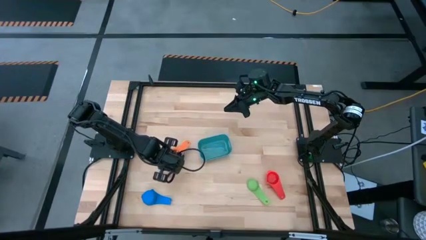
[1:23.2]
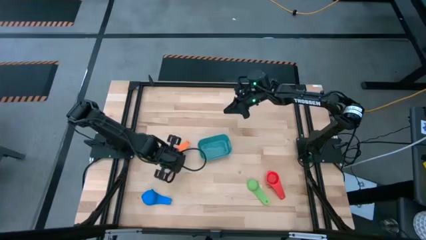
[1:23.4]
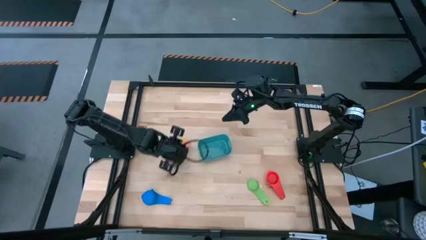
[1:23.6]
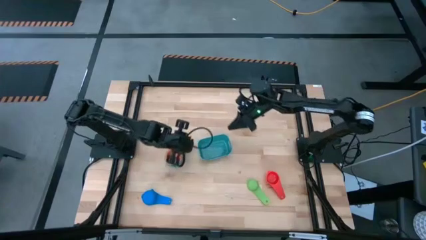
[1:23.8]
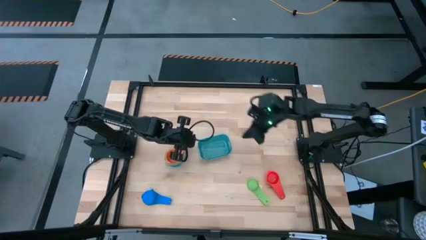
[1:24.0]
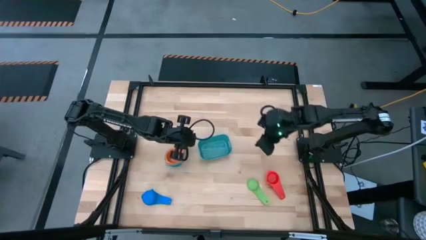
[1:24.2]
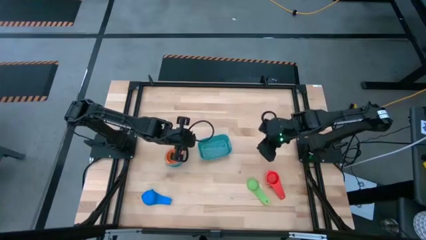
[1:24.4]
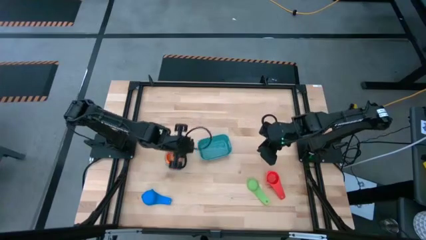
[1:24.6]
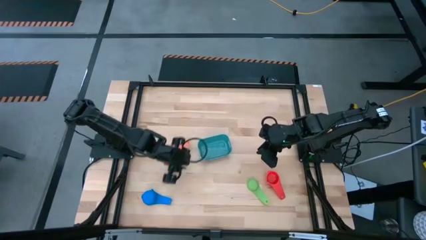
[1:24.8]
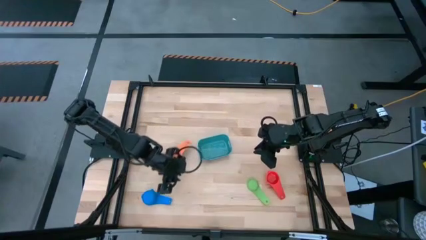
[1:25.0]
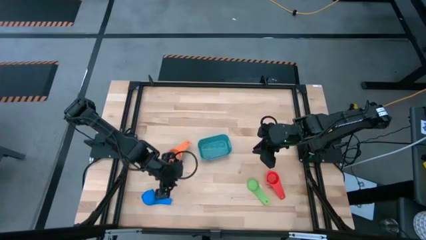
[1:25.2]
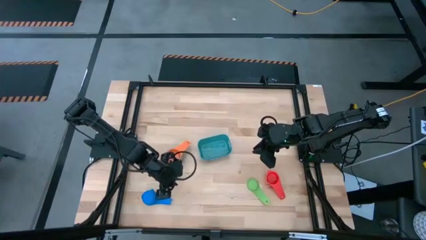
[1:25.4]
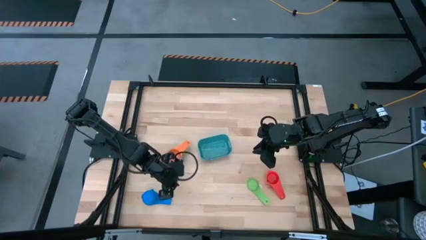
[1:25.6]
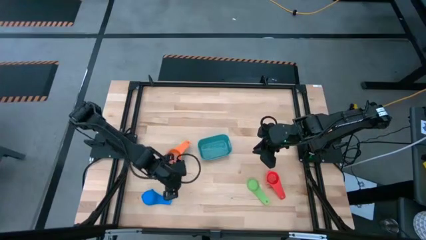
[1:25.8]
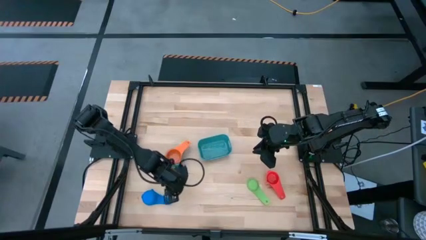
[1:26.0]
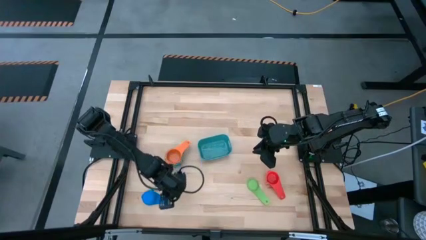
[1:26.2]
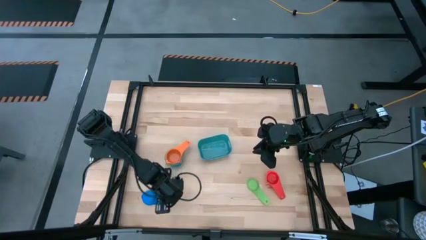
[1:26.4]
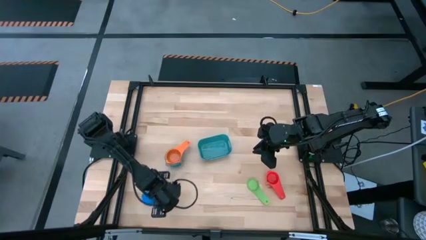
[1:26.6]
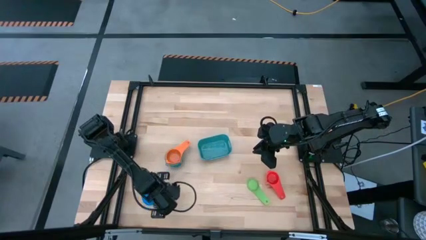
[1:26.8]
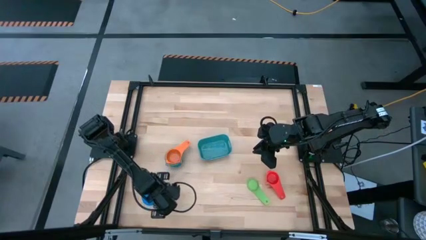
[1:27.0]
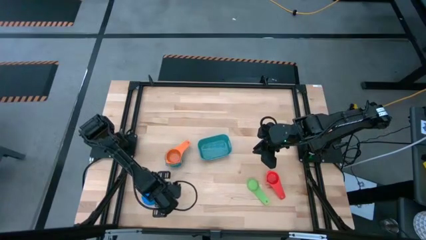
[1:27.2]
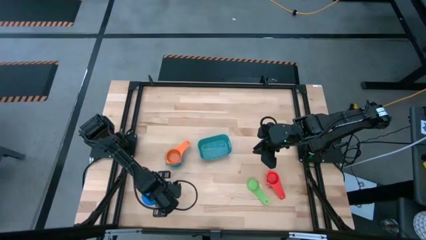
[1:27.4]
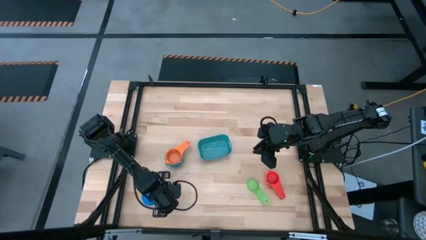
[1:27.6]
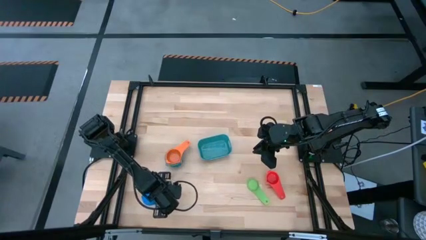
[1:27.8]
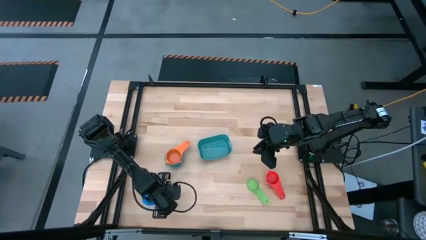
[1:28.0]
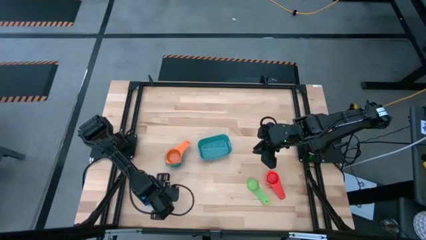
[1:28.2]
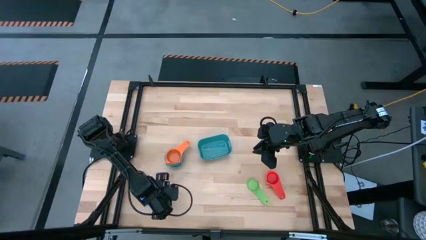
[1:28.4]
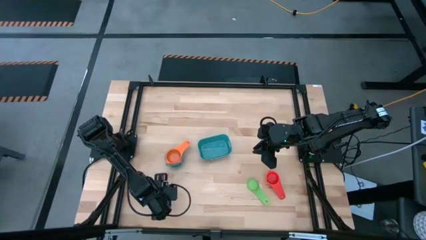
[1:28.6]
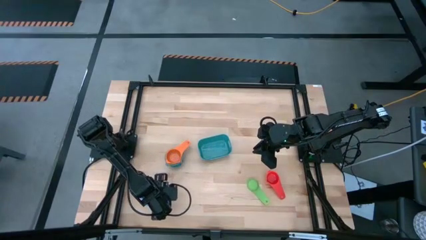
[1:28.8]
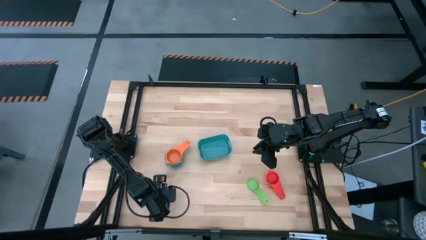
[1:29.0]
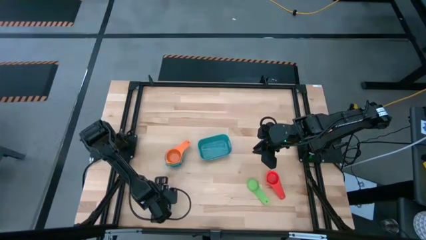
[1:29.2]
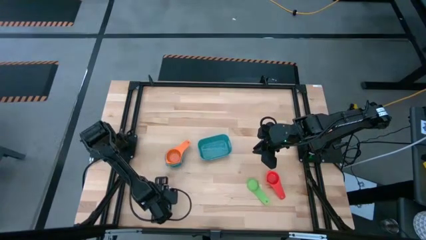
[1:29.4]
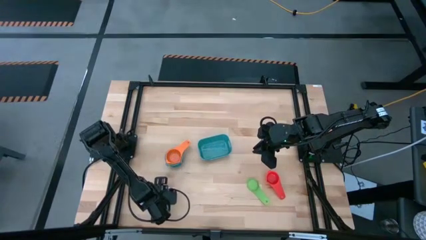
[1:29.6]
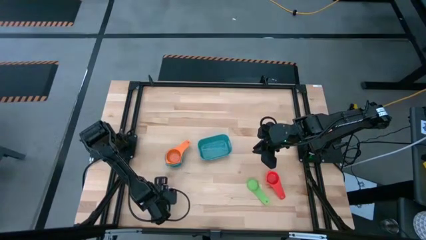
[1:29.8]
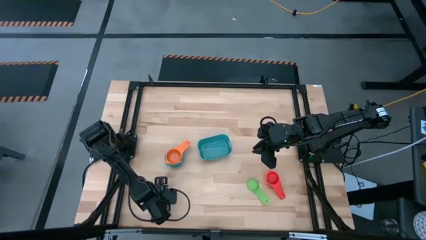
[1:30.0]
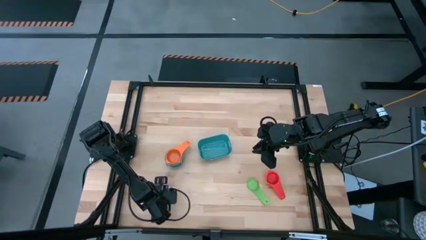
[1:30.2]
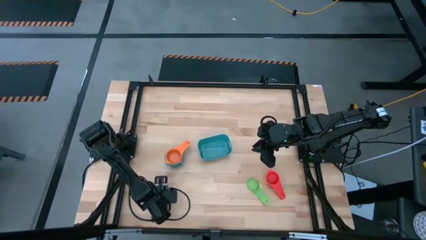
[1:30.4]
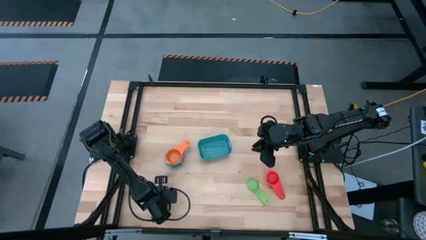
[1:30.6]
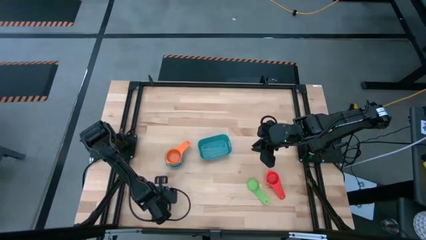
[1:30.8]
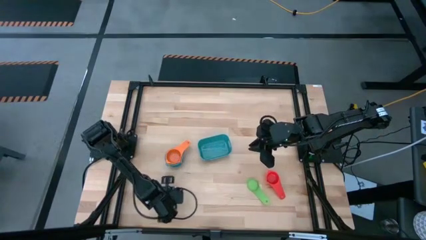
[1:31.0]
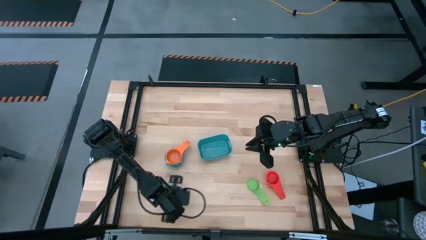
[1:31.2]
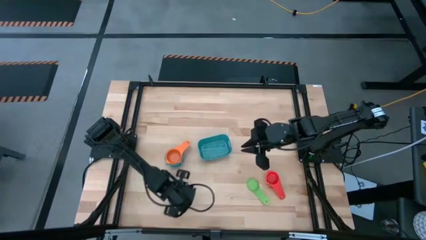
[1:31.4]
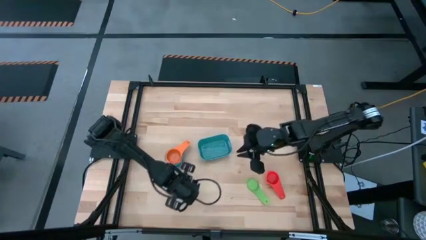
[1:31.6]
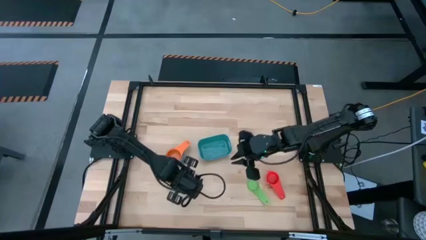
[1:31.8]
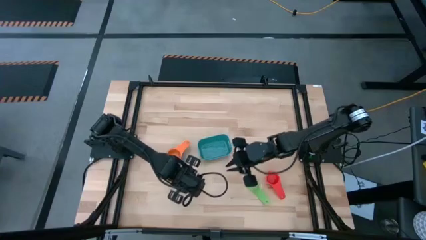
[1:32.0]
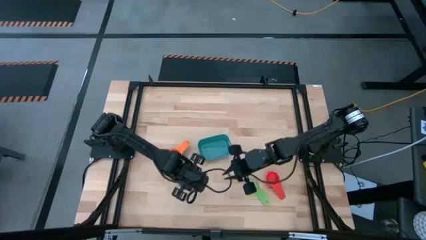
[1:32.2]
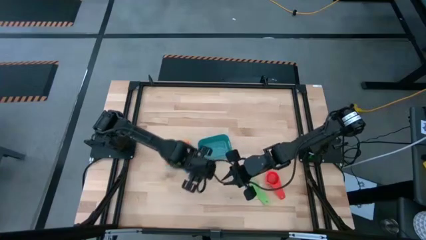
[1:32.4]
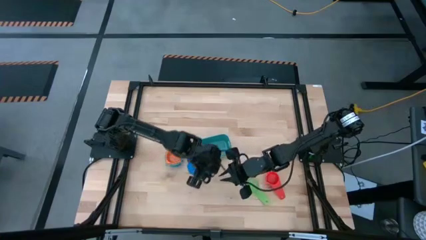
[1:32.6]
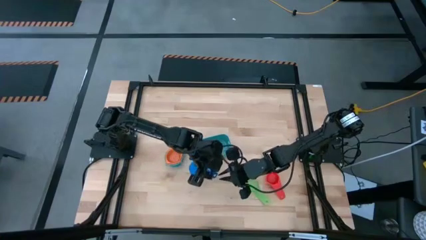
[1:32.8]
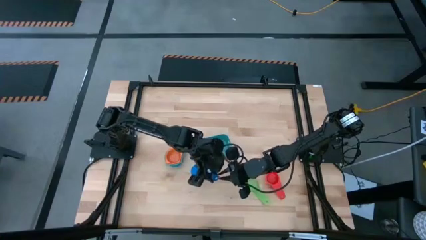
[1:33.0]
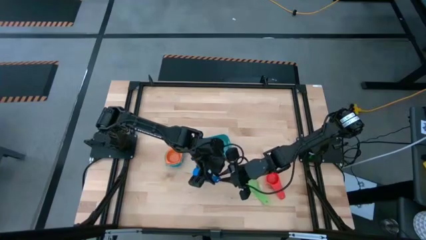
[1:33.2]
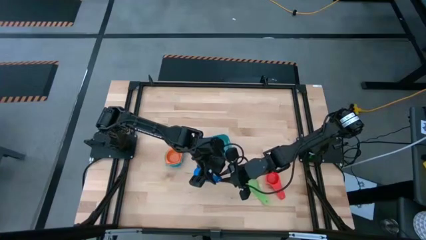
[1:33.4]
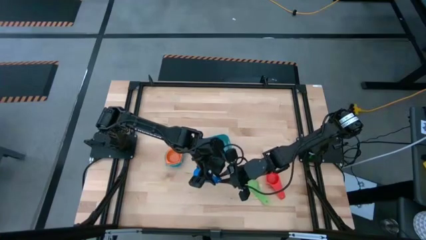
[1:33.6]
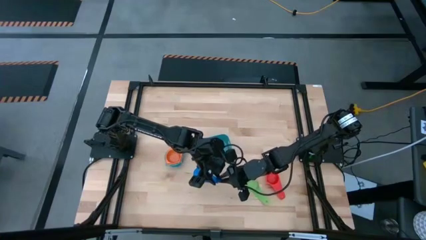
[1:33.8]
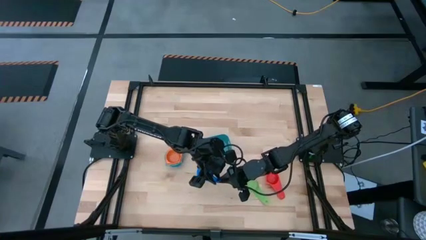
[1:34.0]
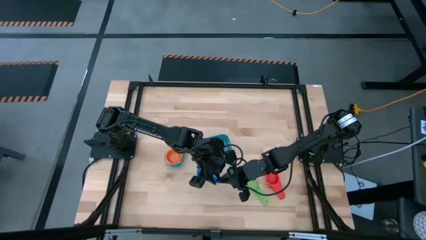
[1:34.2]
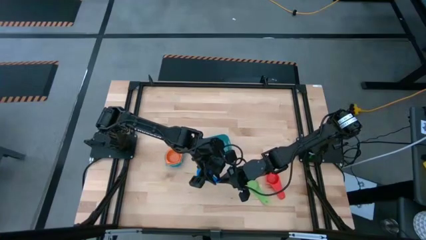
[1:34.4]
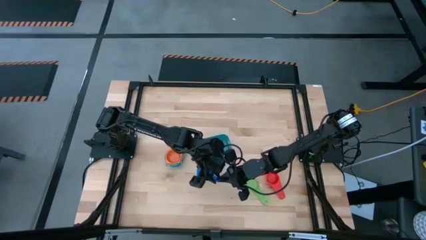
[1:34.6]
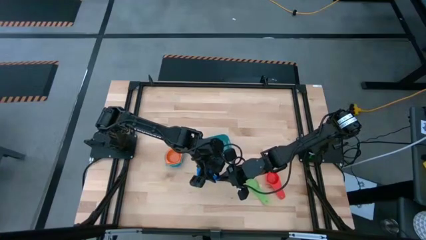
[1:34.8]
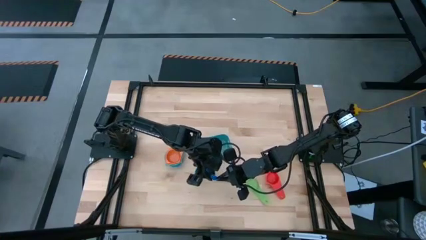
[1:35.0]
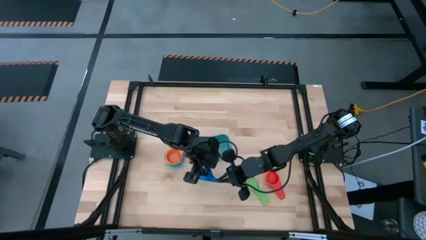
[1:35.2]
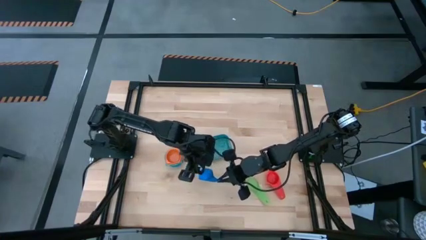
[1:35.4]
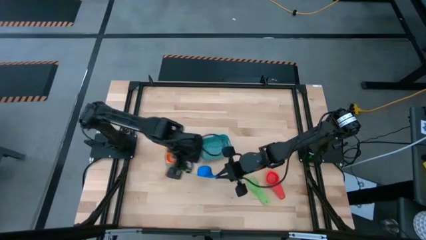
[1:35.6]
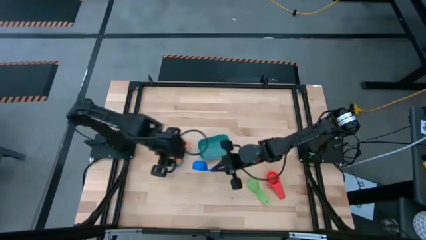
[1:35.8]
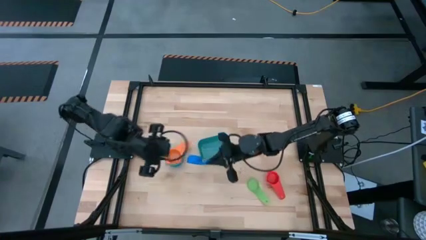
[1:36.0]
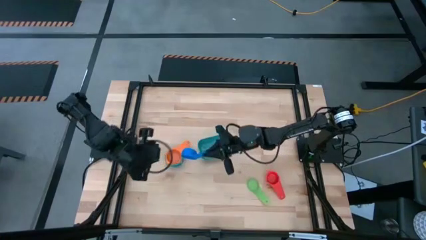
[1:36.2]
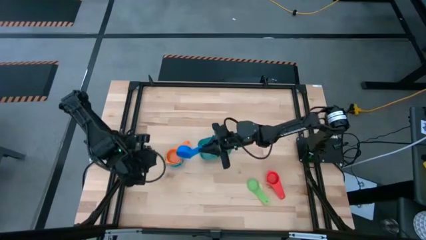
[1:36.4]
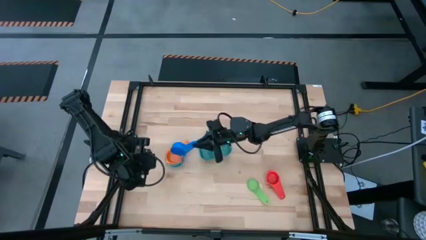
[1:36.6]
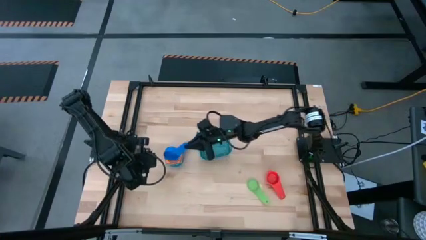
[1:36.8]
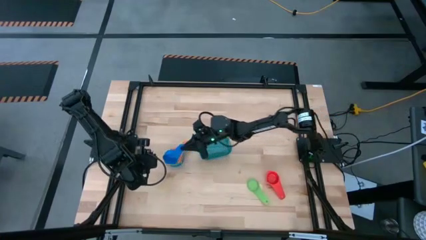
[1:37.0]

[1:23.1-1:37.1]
Task: Nest measuring cups in basket
Stack the blue measuring cup on top of the orange measuring cup

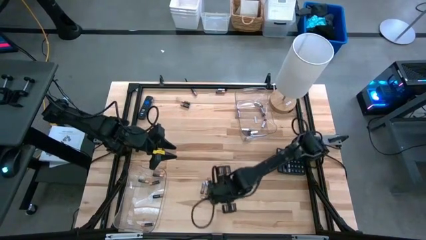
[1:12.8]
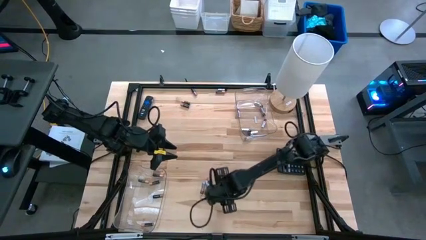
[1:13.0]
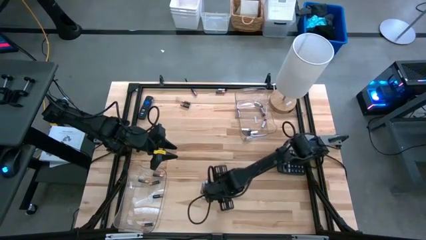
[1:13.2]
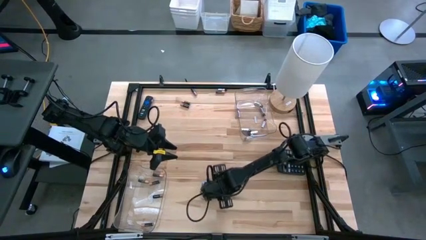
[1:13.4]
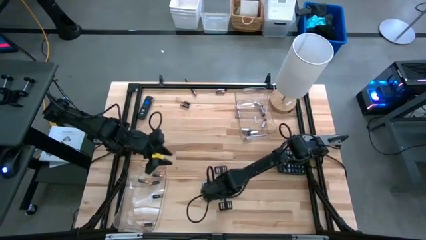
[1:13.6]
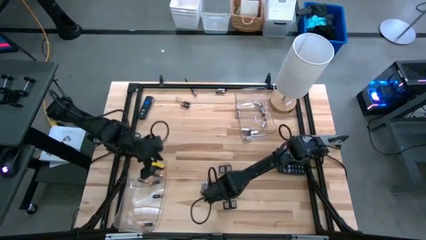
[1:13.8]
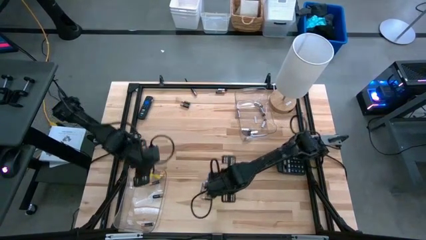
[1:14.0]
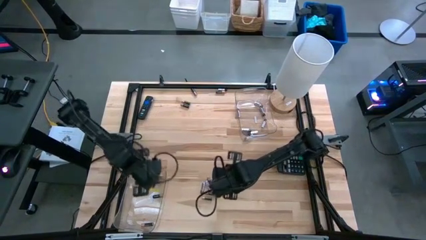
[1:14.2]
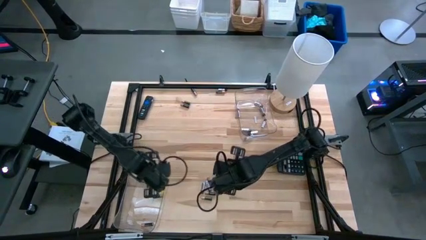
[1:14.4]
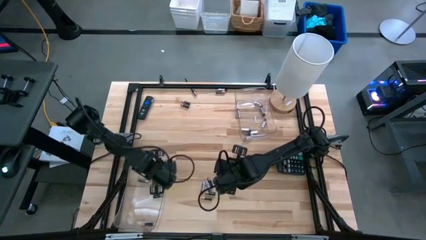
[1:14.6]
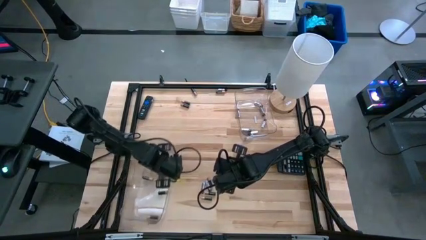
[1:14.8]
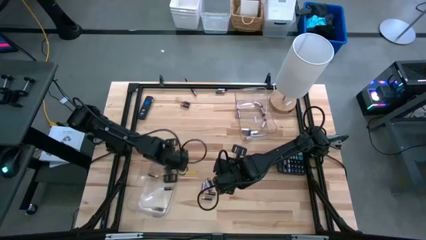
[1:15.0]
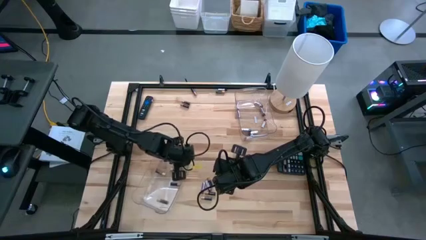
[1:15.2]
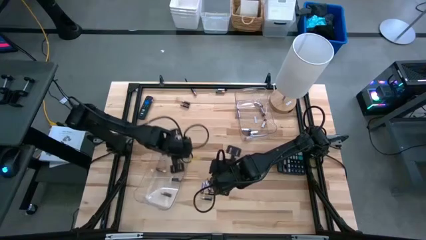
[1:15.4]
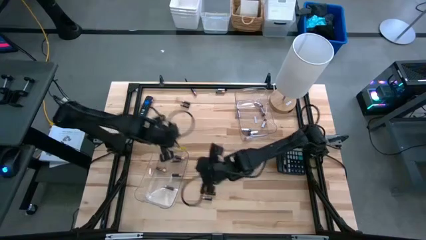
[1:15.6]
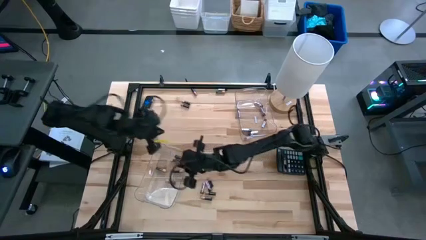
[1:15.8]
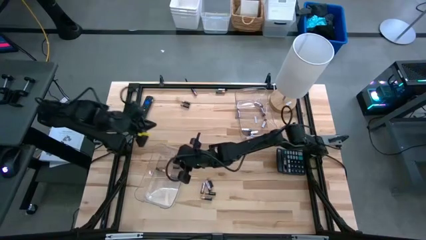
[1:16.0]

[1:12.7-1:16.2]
Task: Sort batteries
Put the brown battery into the left transparent bin
